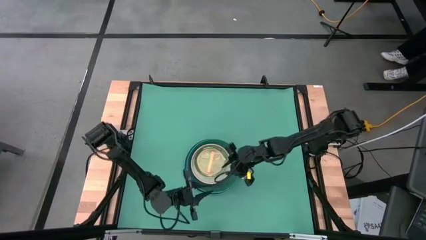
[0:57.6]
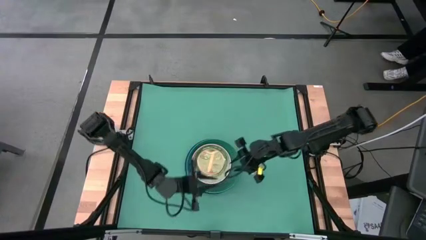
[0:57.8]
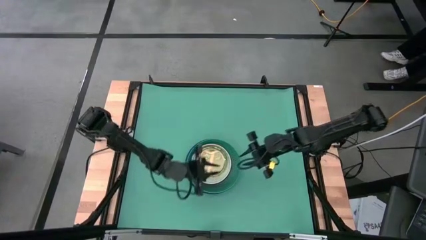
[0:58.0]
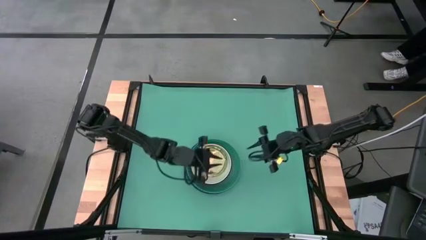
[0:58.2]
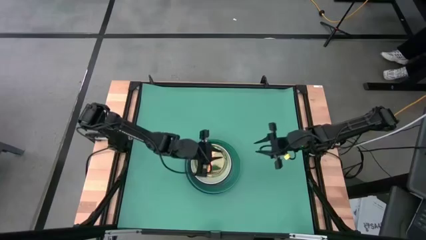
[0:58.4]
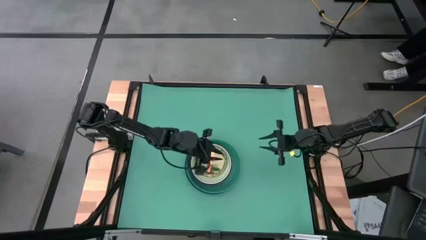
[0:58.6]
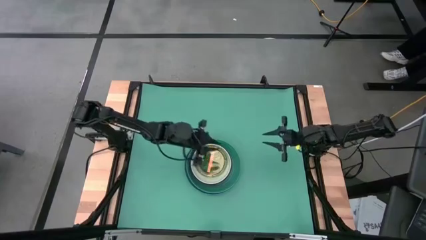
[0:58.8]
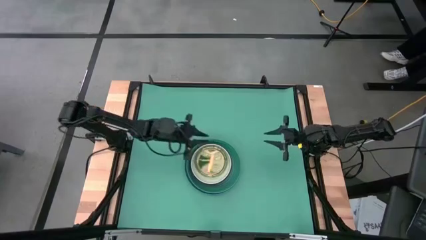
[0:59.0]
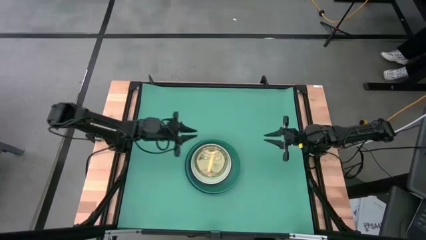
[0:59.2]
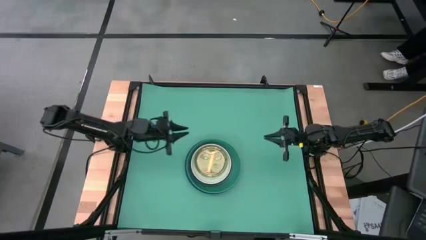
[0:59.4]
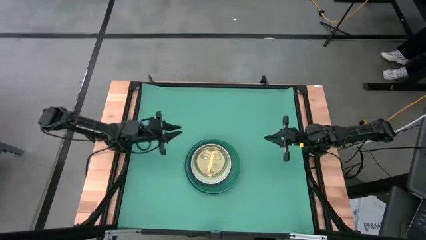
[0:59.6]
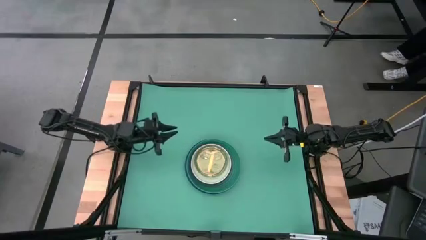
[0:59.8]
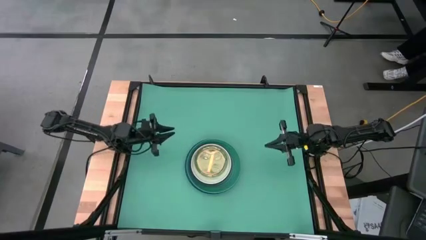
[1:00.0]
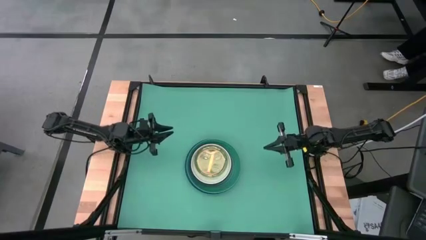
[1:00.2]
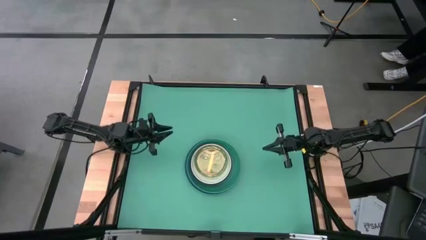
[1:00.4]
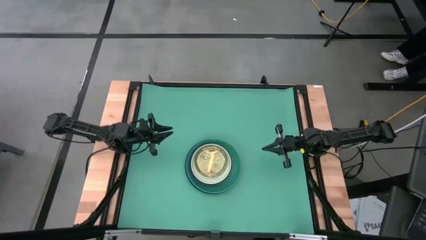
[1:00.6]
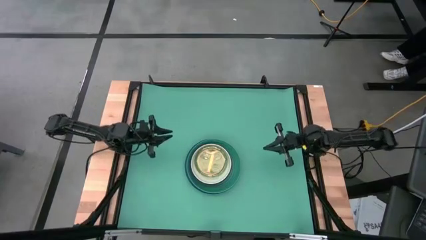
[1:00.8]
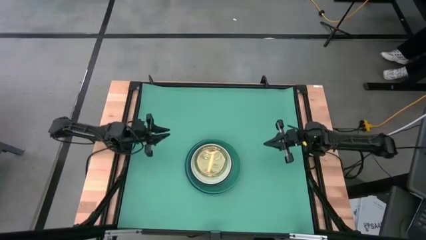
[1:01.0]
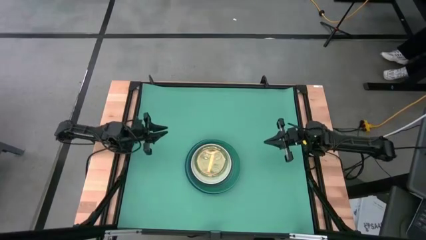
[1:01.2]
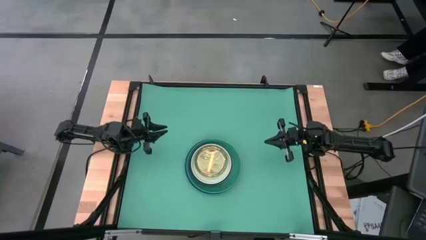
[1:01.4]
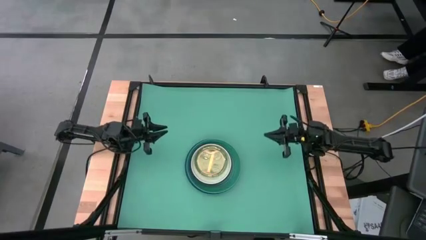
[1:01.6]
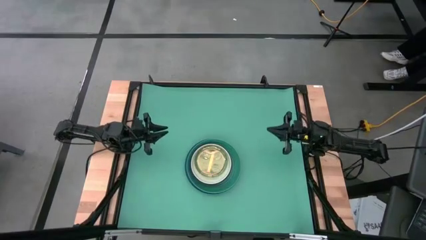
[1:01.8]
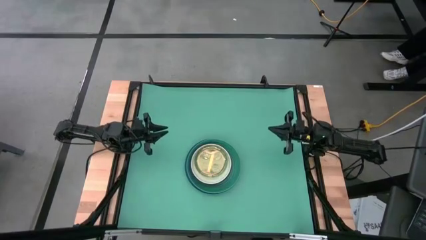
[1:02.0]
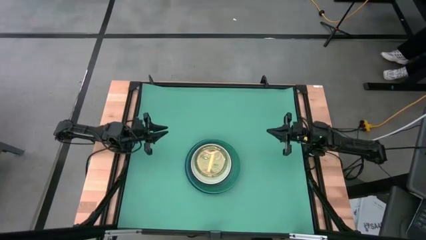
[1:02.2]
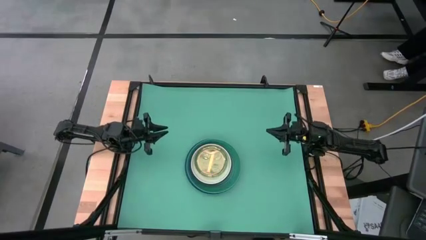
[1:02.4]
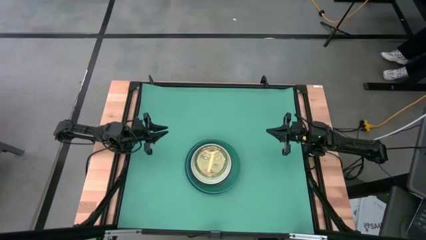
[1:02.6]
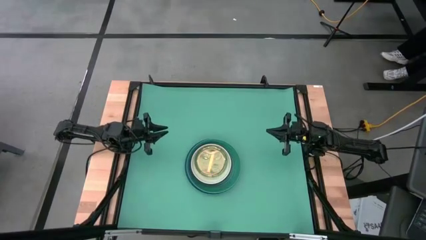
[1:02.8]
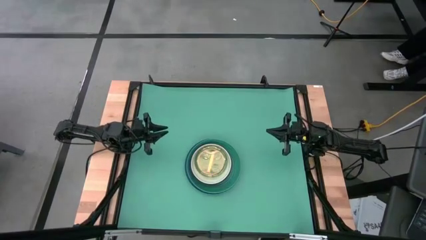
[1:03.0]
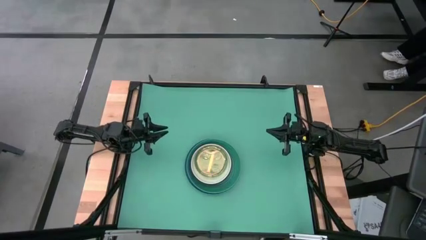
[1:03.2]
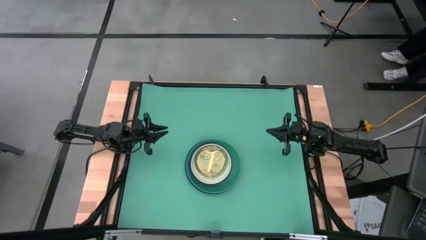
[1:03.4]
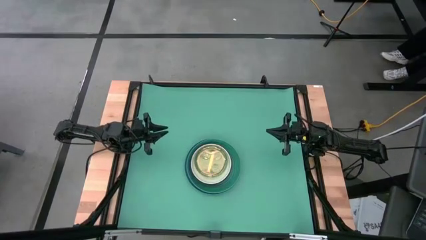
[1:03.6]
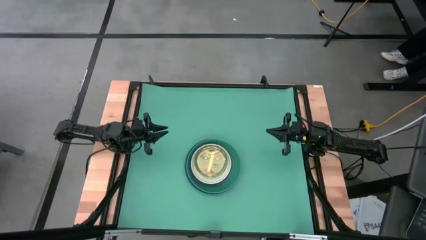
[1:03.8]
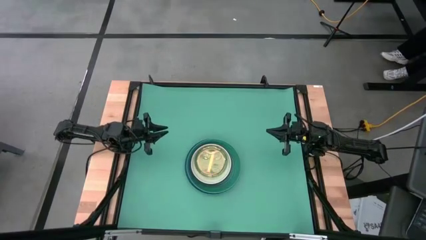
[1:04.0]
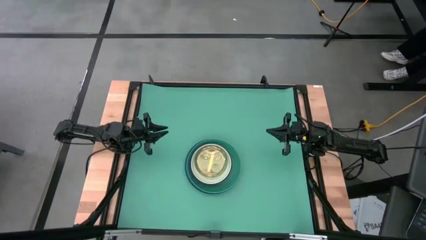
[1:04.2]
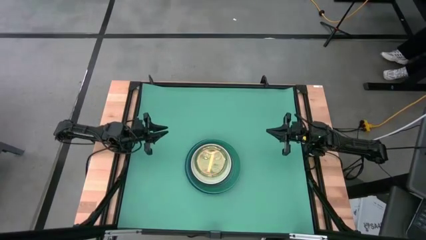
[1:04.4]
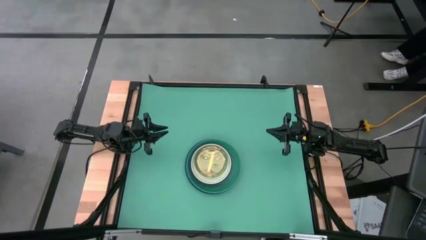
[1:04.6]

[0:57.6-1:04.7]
Task: Stack plastic plates
Return to Home Position

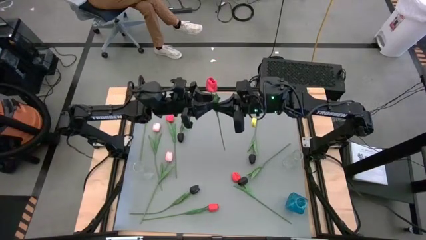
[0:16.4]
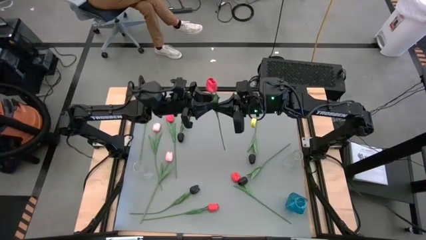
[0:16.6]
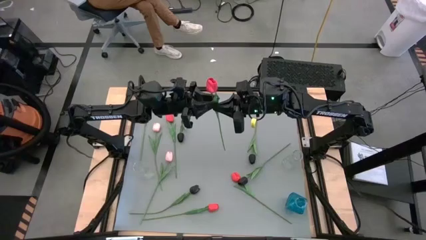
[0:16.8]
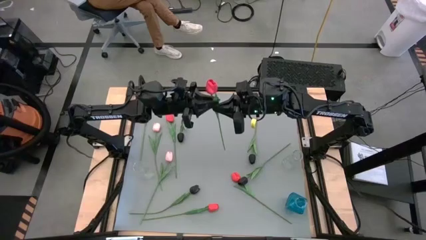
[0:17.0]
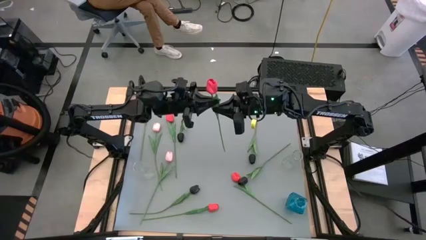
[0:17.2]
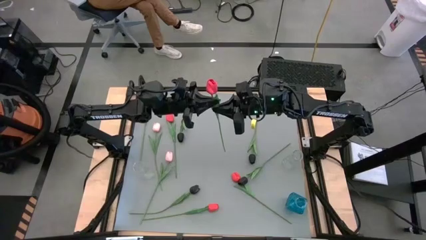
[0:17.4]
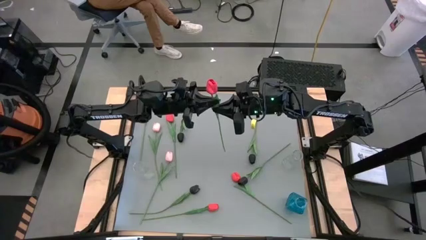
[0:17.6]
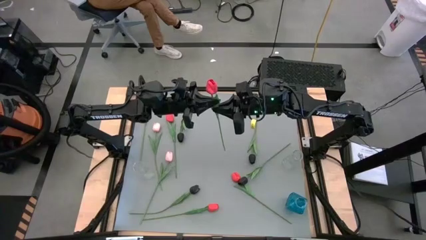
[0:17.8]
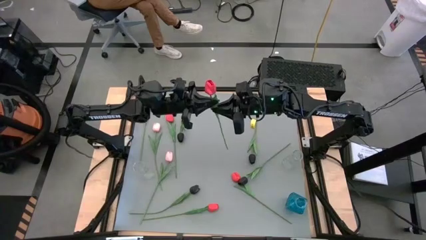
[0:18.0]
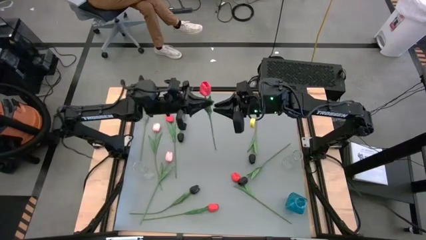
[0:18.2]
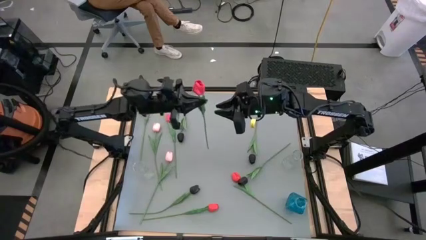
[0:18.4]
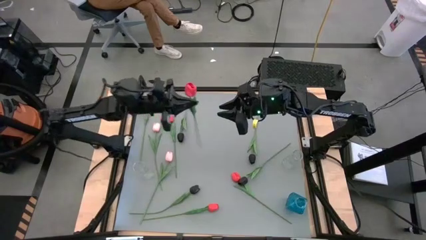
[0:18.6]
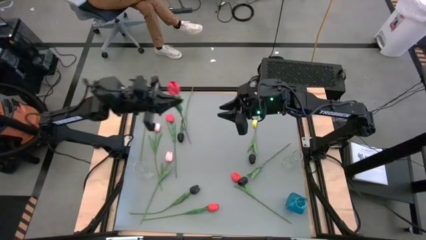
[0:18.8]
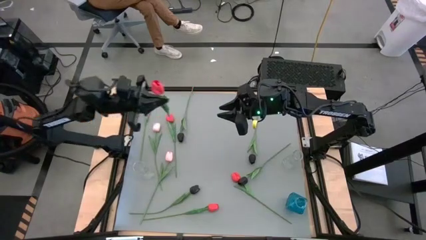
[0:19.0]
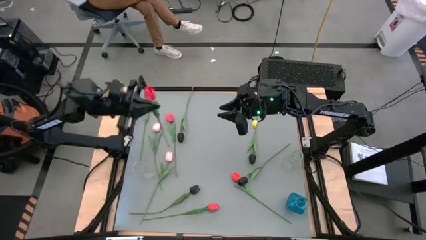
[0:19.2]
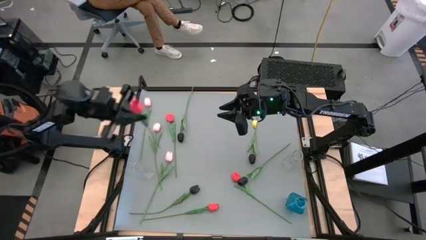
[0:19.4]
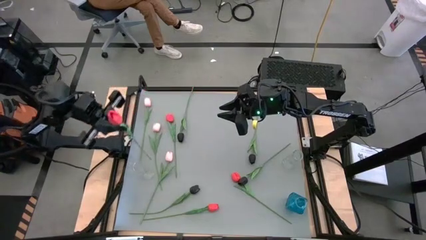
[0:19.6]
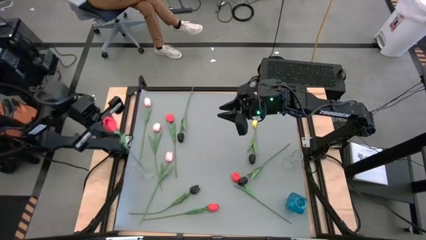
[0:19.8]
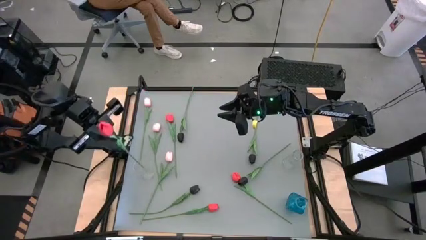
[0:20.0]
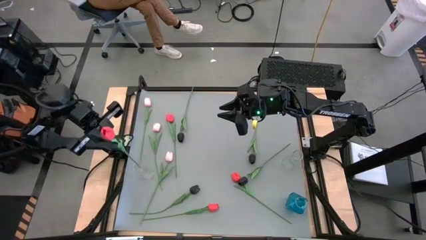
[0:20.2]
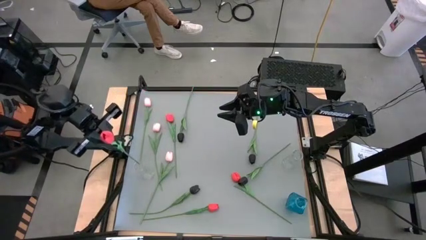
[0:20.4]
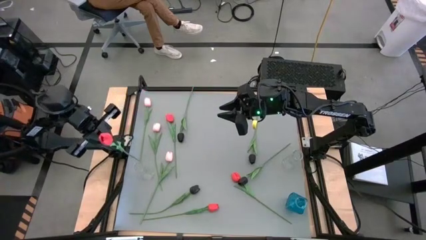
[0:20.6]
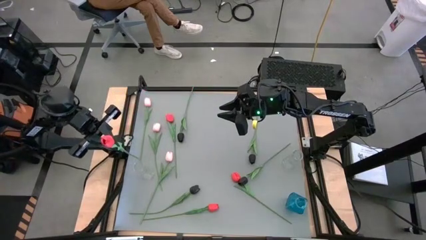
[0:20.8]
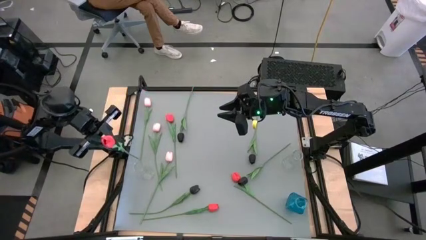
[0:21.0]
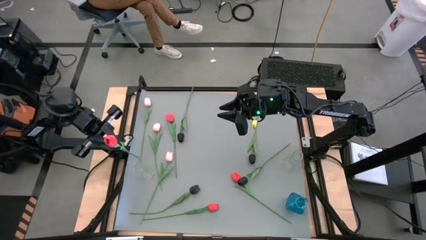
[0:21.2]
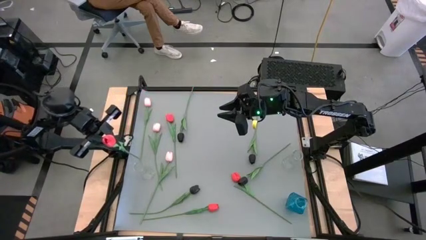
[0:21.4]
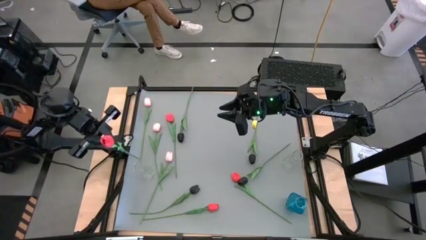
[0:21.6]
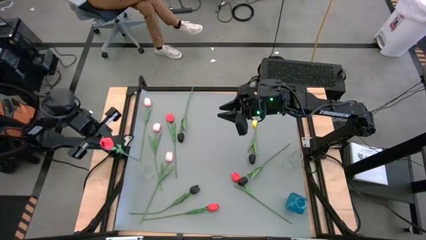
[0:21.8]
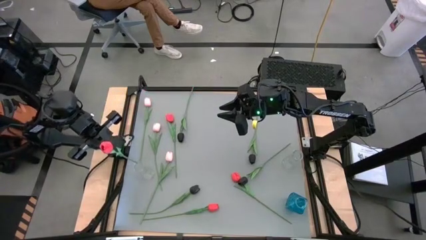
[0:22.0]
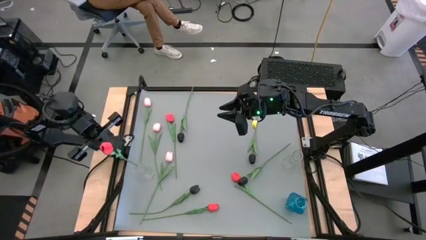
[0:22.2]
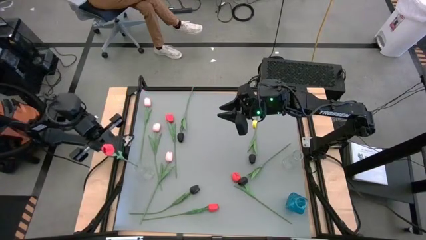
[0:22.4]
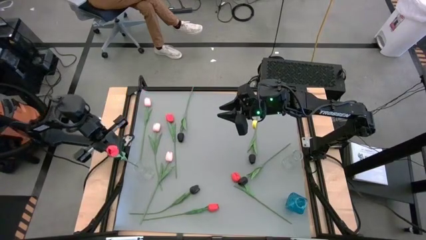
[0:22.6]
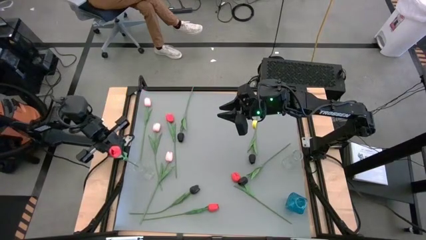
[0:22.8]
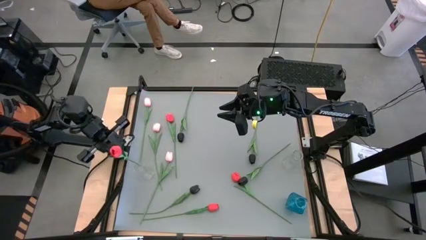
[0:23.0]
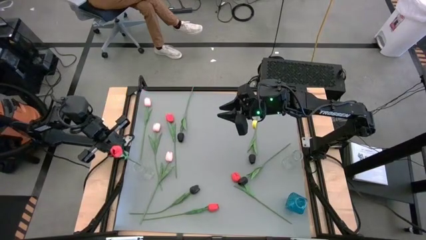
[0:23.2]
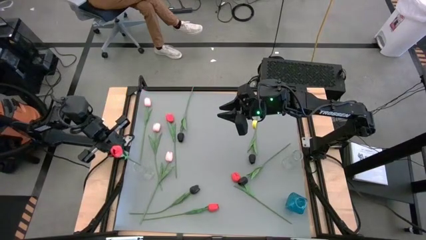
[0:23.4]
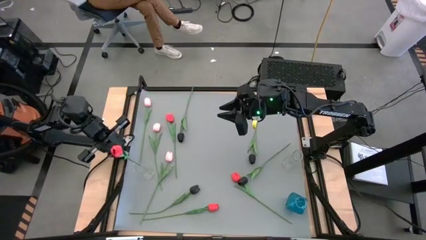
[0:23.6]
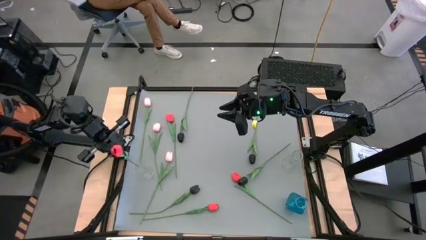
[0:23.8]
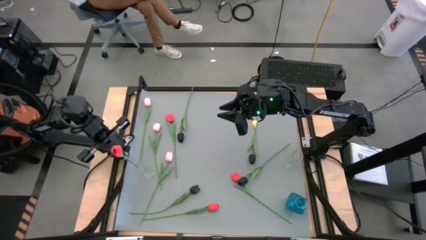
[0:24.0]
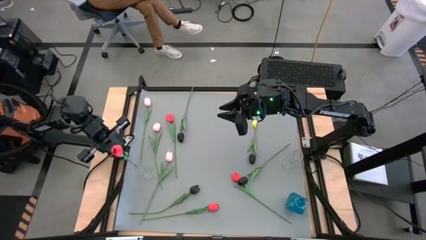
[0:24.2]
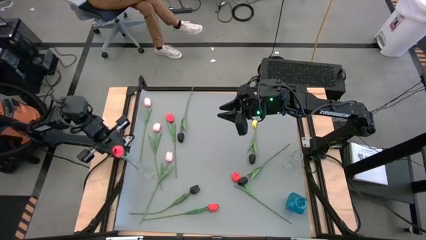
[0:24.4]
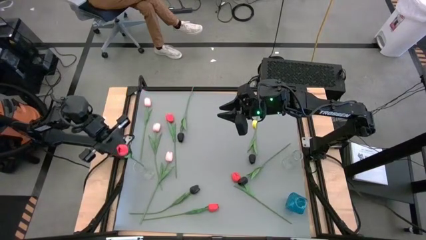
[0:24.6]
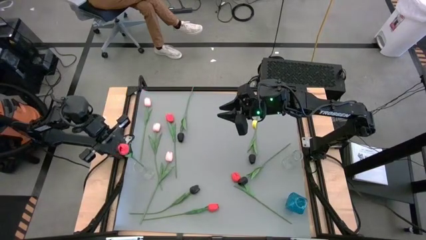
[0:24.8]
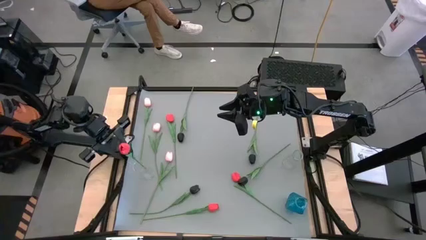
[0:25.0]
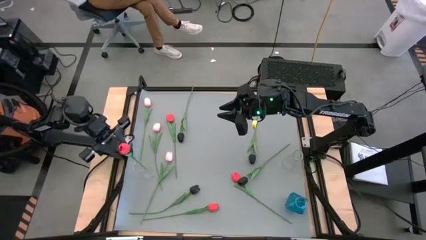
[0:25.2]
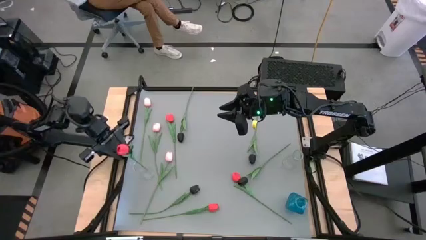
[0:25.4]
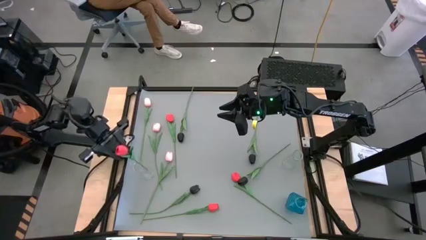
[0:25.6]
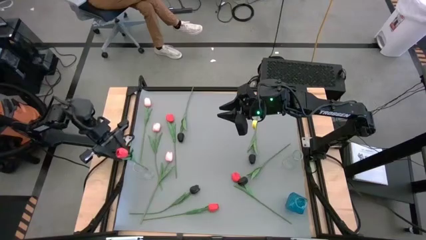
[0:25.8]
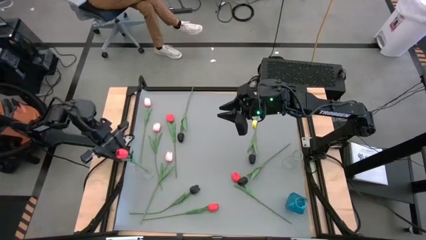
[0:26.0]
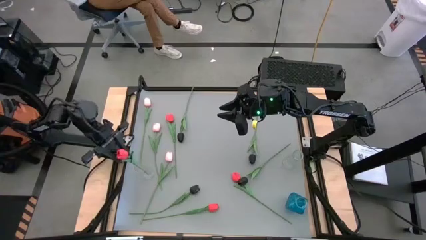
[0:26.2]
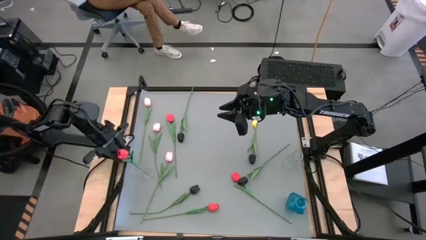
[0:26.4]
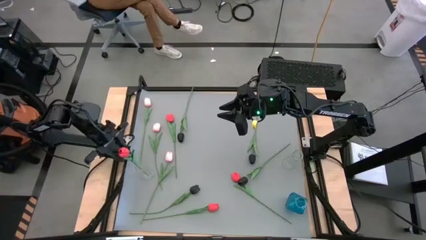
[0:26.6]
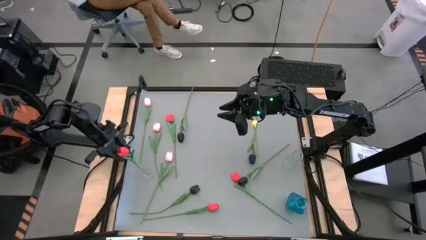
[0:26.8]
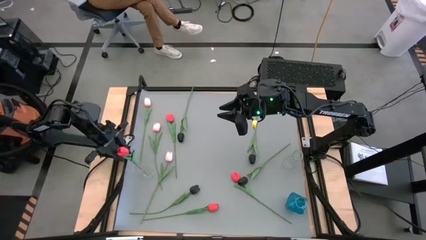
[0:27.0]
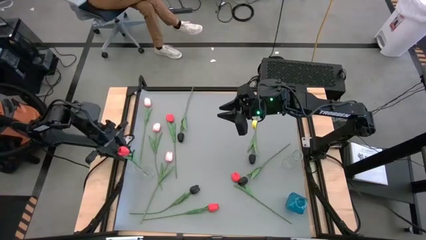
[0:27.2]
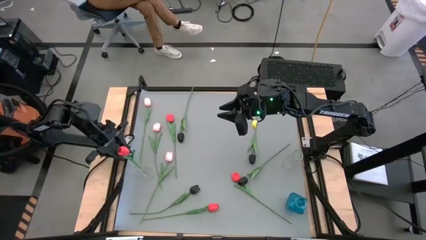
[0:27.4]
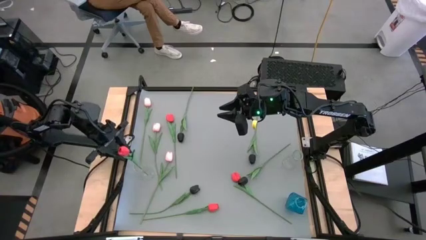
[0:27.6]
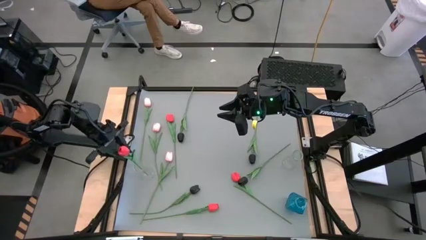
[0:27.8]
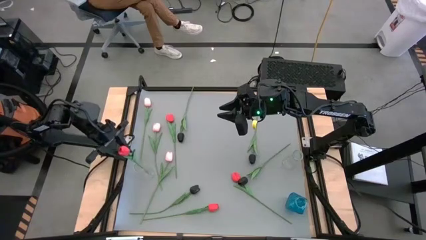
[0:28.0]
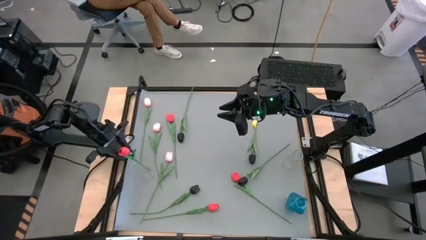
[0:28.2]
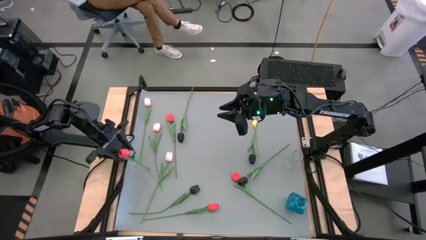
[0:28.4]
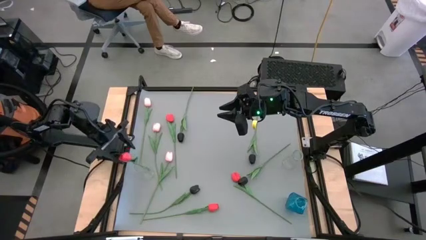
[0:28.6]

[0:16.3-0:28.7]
Task: Sort flowers into vase by color
Put the top right red tulip into the left transparent vase
